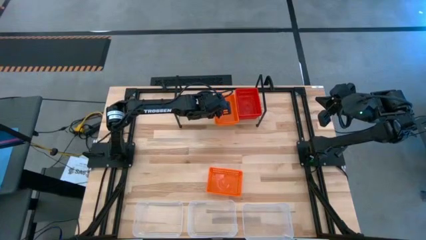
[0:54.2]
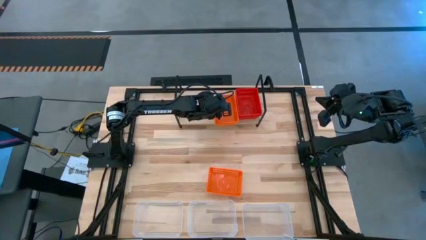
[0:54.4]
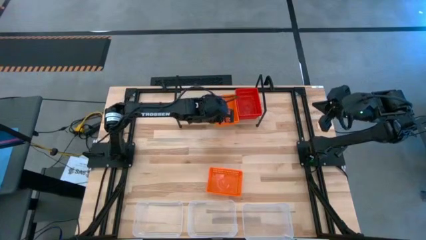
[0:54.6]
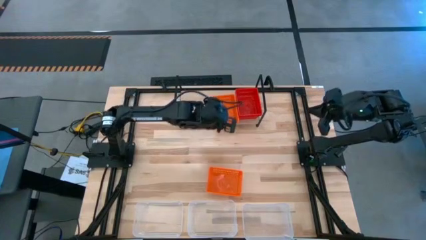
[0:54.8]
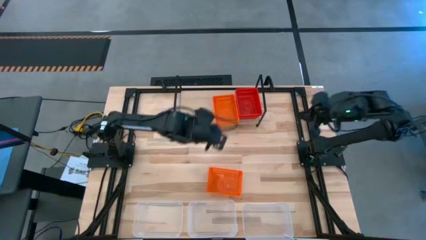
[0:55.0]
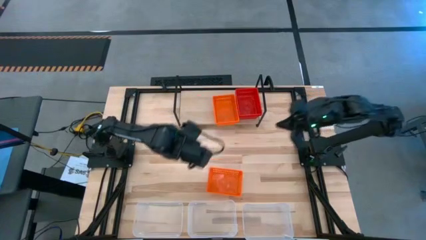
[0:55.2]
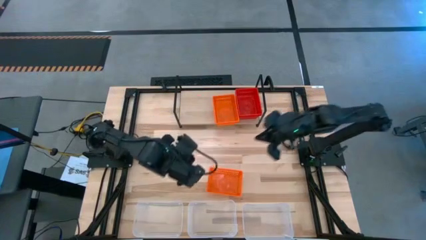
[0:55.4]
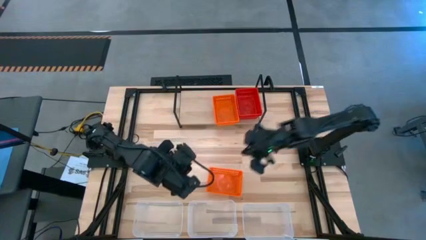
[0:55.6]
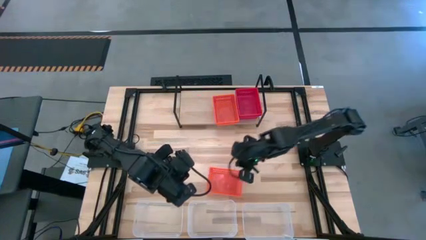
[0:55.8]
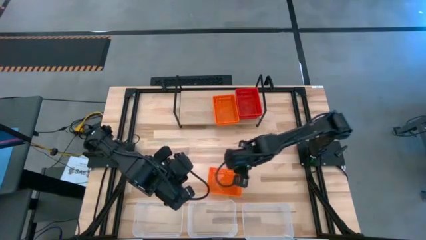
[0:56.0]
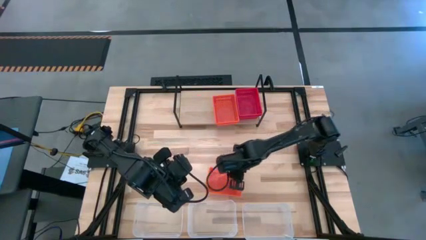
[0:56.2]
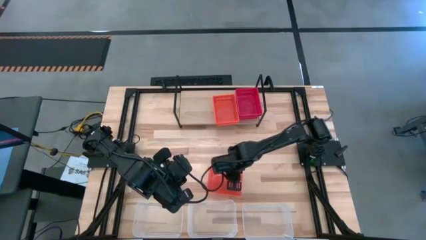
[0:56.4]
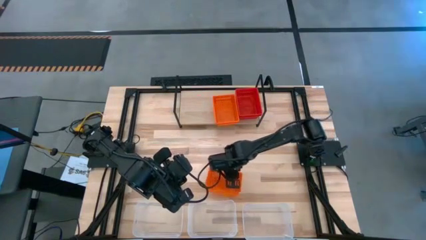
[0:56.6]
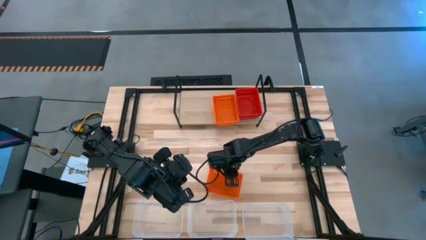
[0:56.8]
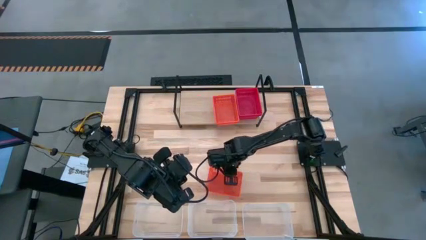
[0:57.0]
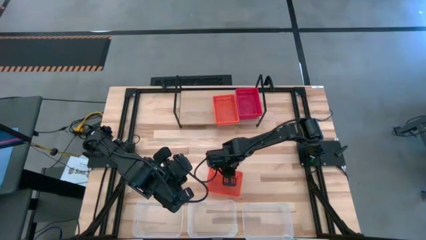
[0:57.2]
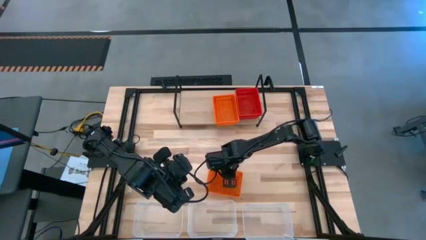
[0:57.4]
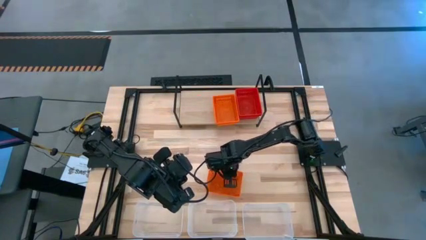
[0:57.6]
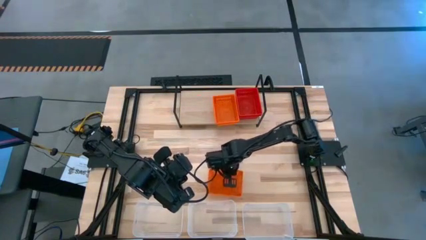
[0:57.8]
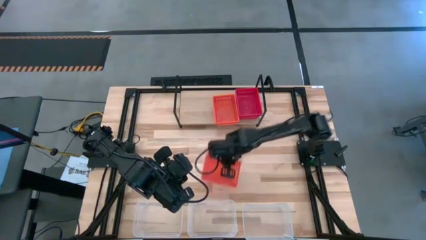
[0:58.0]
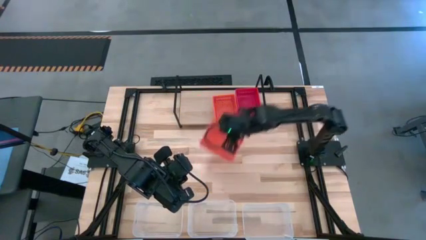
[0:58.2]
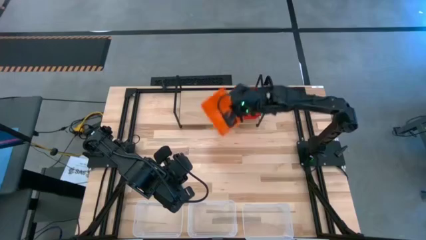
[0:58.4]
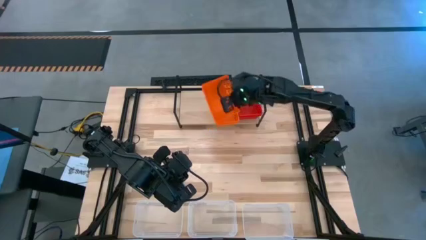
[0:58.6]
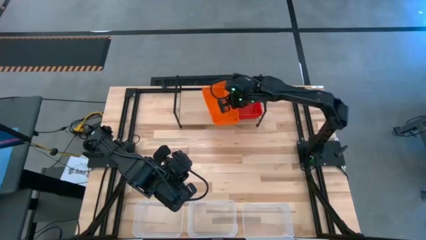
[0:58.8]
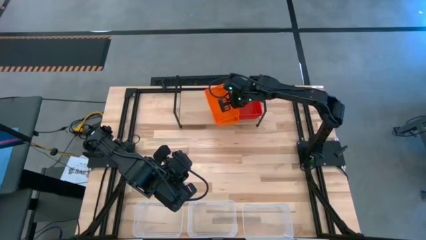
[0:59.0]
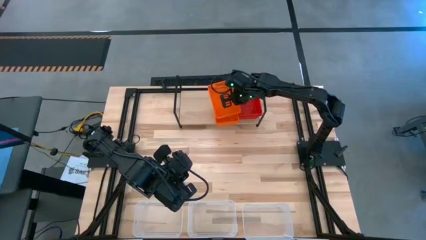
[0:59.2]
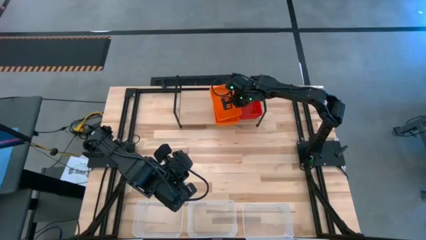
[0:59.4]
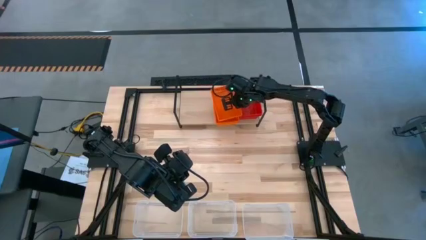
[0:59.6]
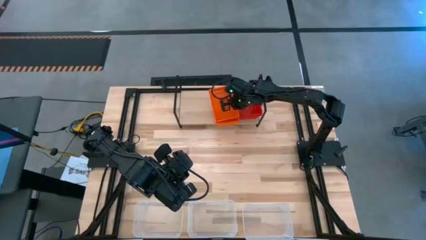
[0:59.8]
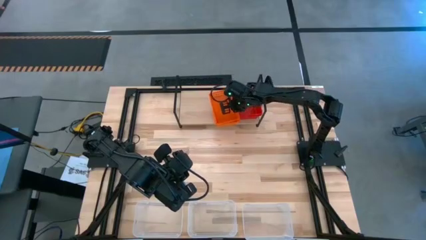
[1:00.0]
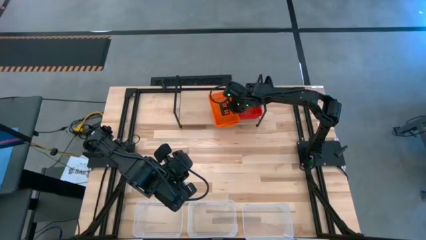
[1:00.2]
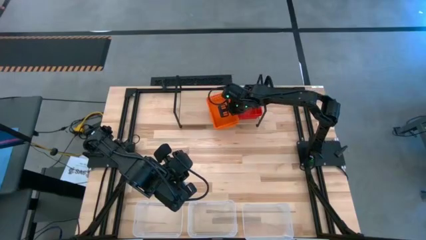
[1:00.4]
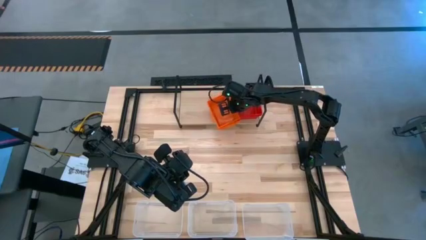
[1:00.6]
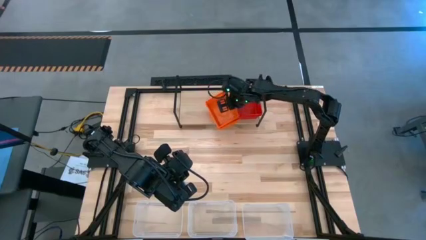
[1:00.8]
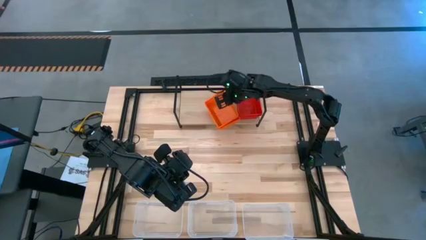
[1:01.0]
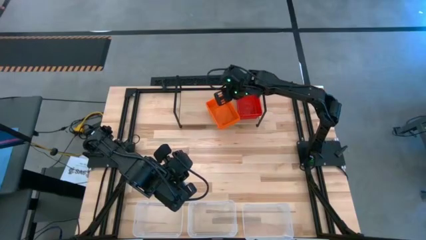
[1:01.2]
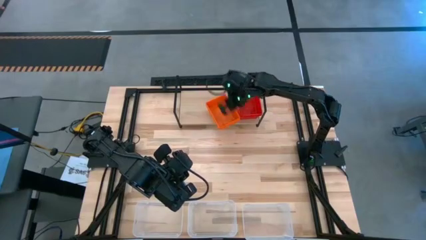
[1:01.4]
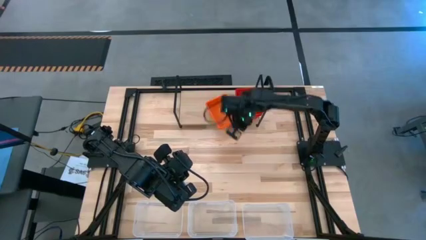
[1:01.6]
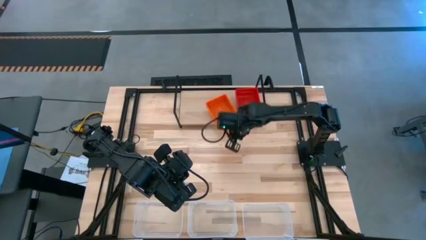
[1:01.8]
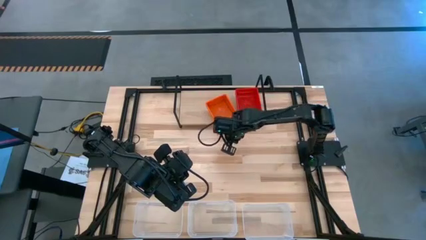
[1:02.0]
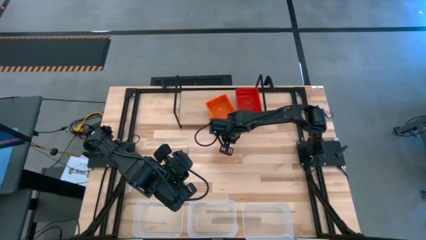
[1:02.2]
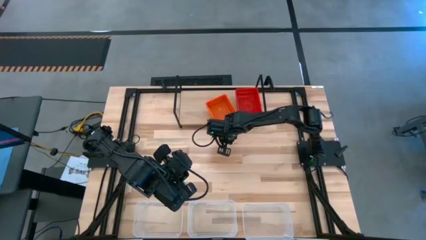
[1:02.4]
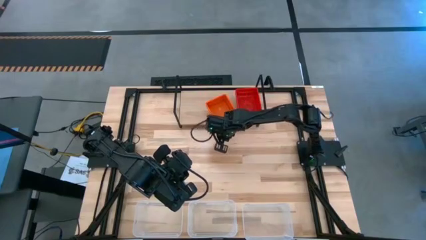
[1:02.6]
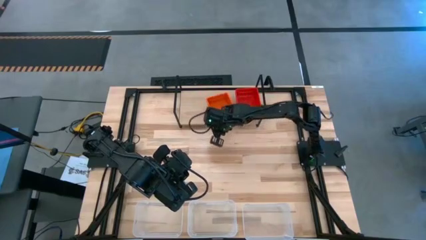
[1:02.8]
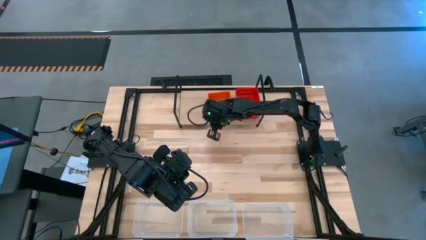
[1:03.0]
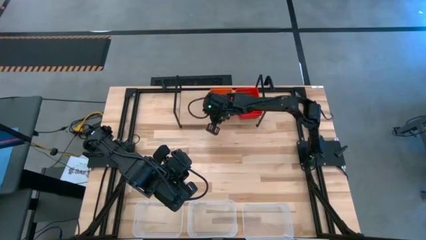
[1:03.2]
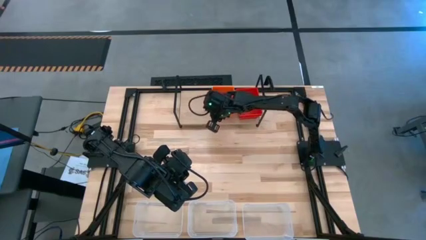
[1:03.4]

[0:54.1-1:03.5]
Task: Stack baskets on shelf by color
Stack the orange bin on top of the orange bins on the shelf

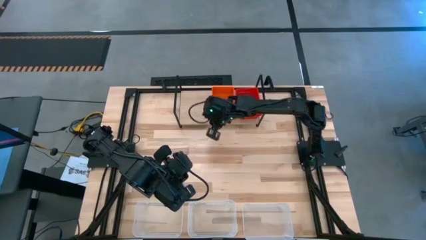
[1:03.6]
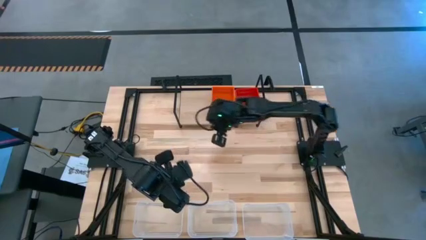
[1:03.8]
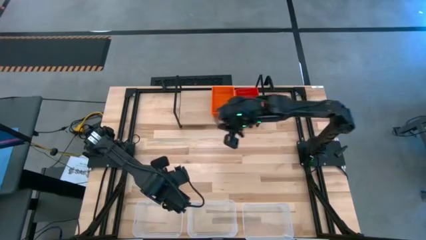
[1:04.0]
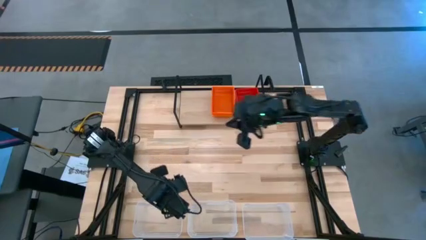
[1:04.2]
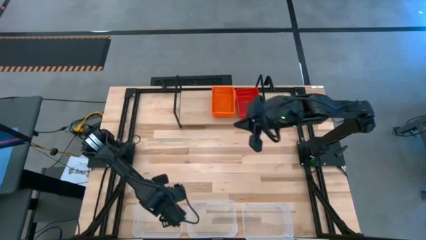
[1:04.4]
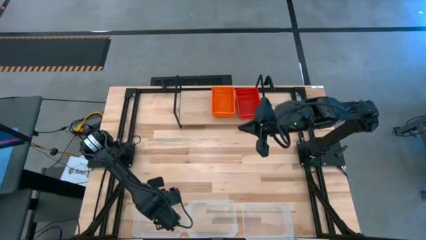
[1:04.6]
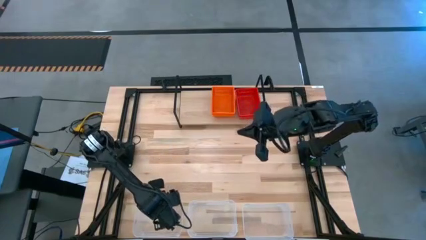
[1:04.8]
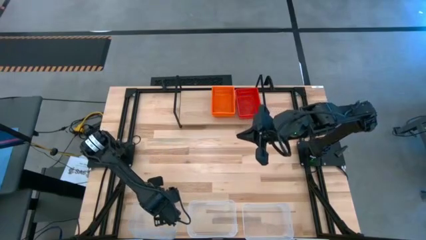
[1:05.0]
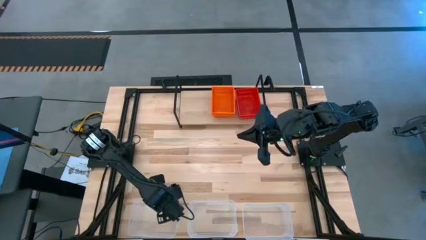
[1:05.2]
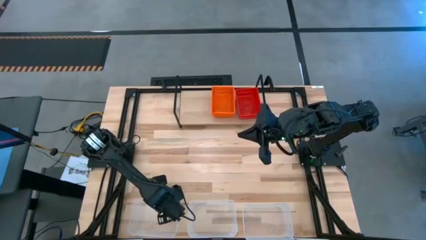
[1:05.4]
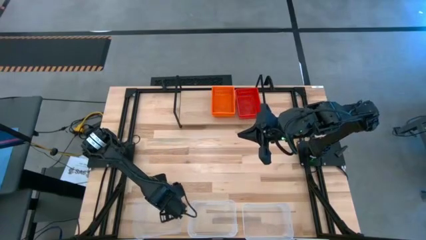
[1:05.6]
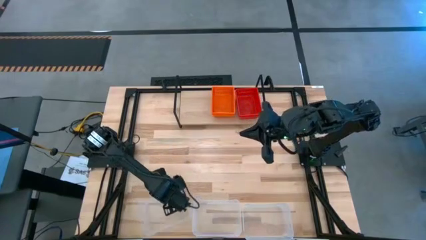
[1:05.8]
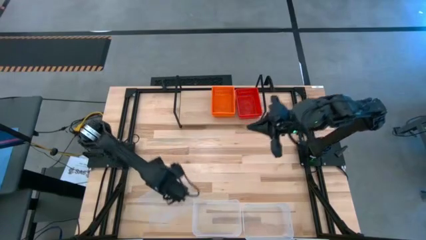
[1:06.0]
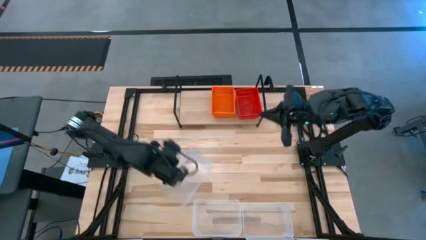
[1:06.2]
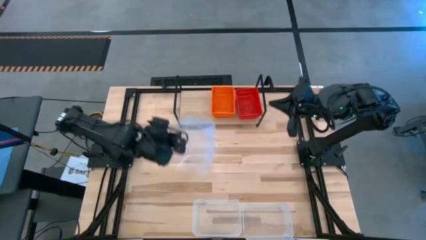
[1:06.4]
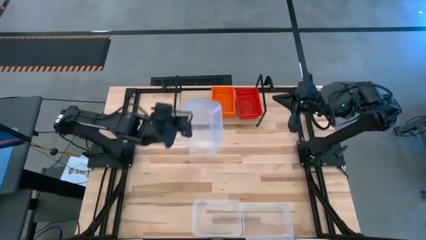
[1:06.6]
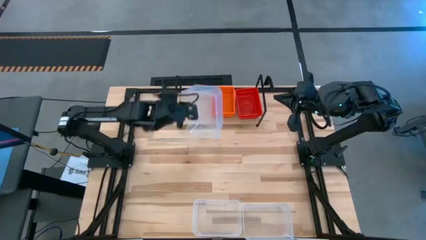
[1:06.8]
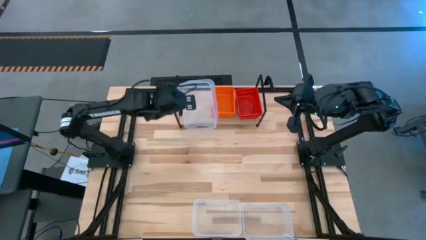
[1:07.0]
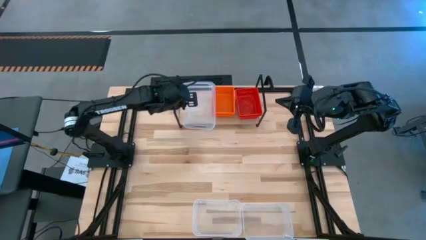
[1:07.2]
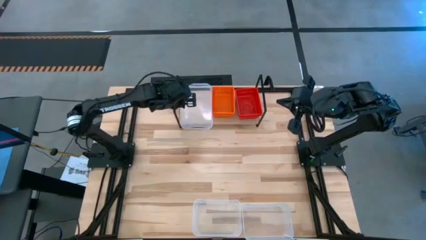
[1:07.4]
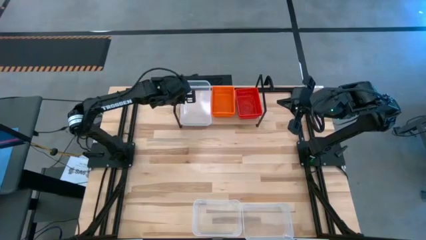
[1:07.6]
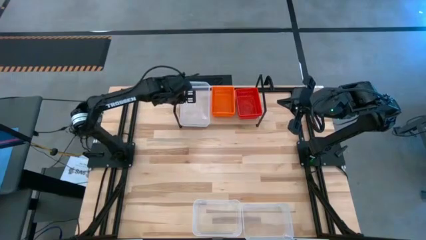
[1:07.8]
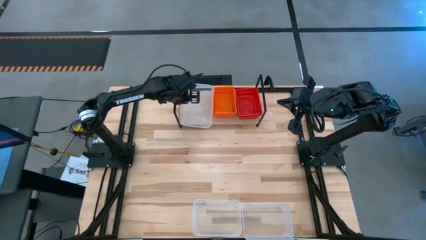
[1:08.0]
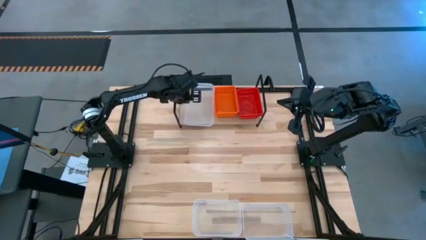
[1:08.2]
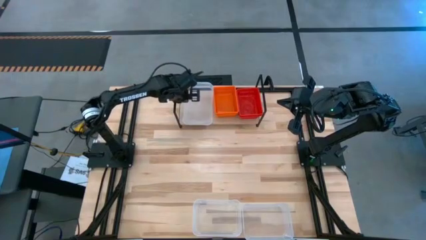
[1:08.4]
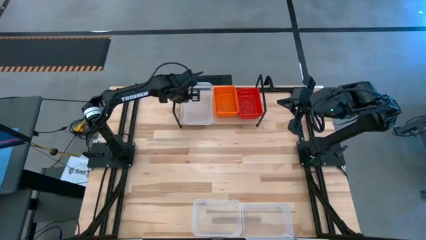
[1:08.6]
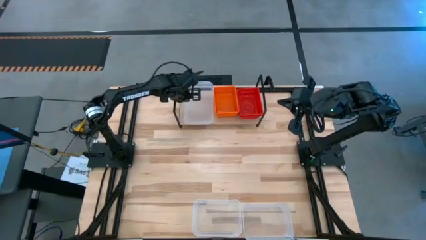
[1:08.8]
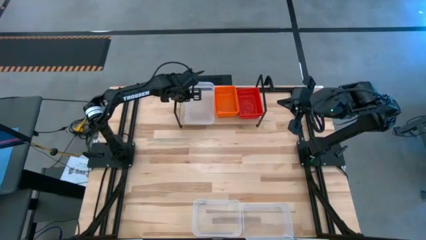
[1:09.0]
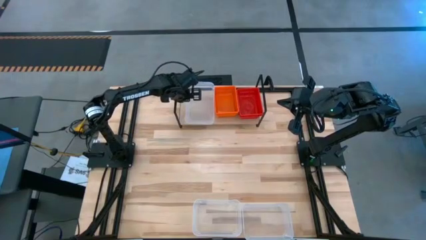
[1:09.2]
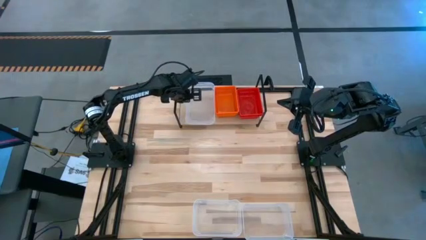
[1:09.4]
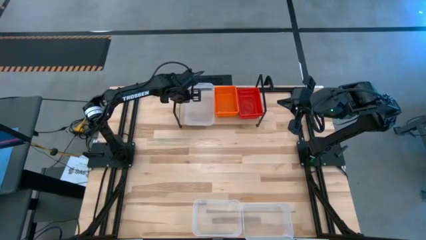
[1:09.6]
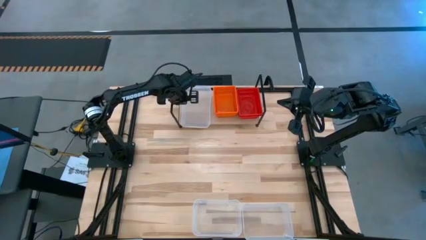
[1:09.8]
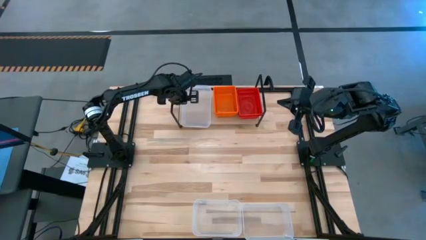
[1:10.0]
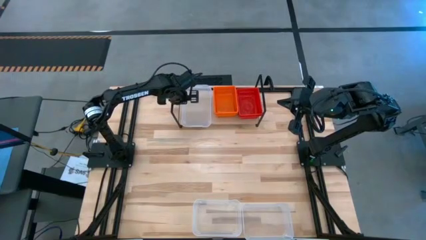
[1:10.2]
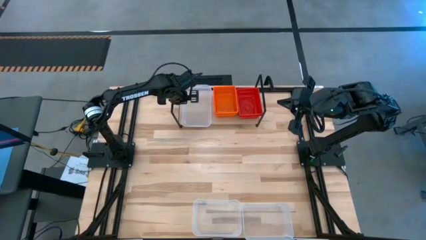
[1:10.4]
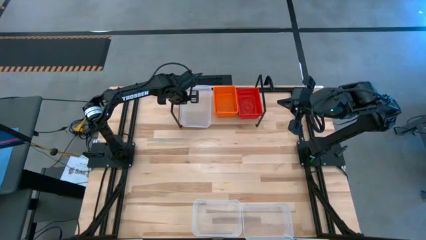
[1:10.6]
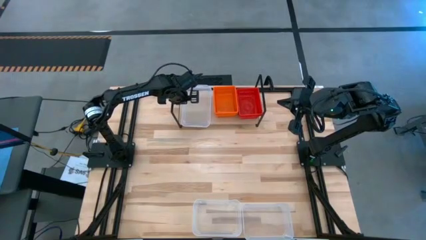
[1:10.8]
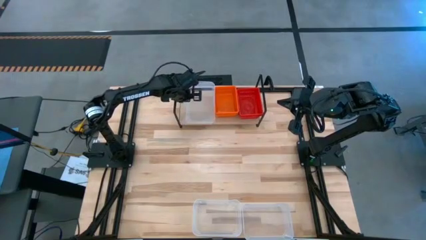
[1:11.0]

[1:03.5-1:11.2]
Put the left transparent bin on the shelf
